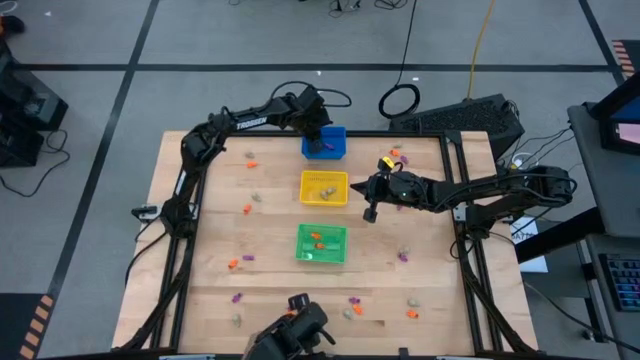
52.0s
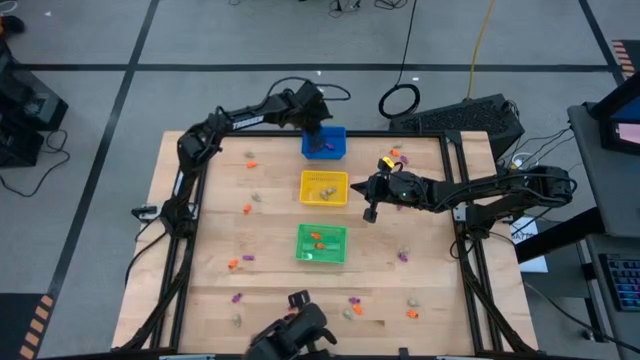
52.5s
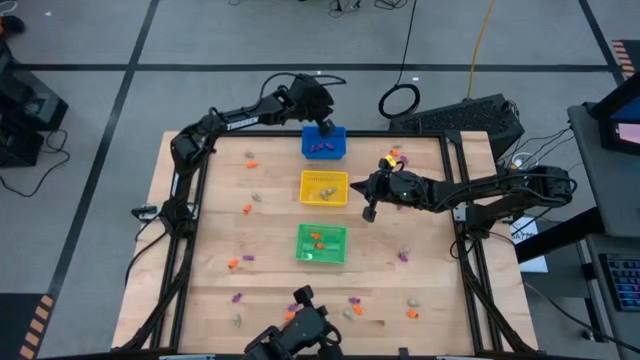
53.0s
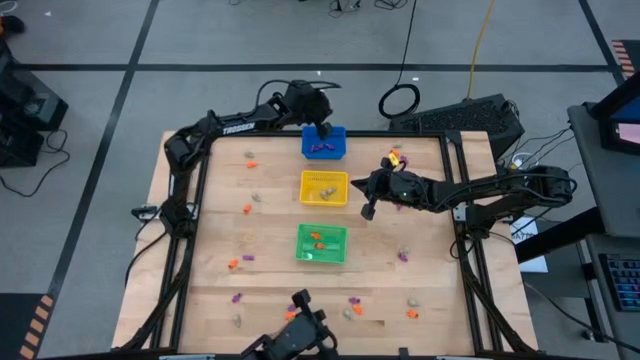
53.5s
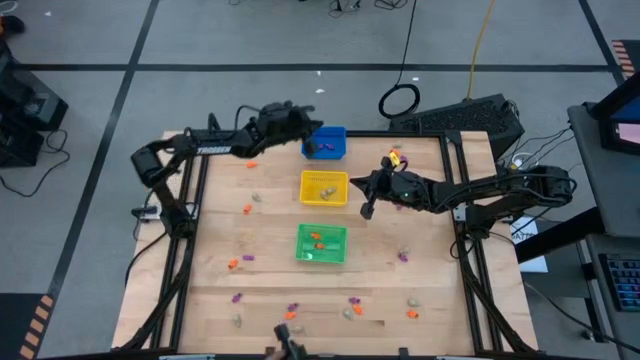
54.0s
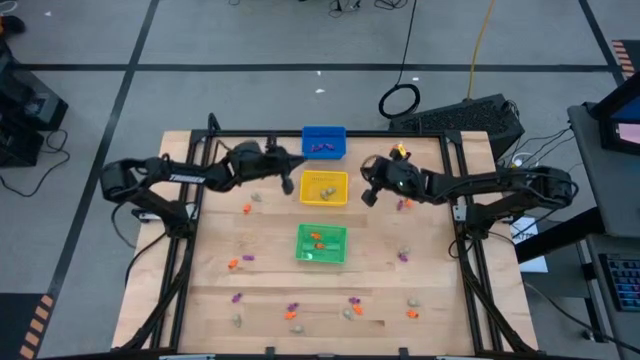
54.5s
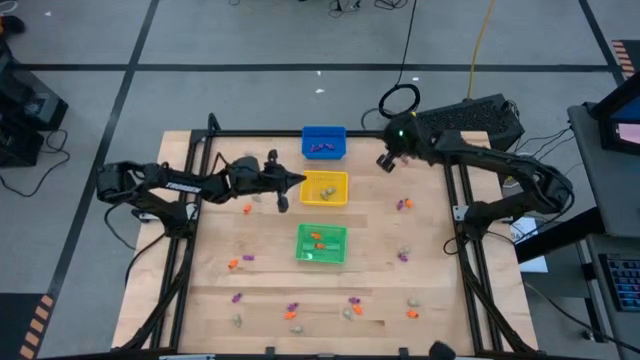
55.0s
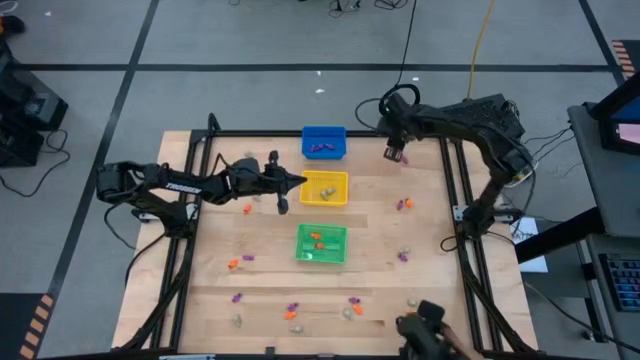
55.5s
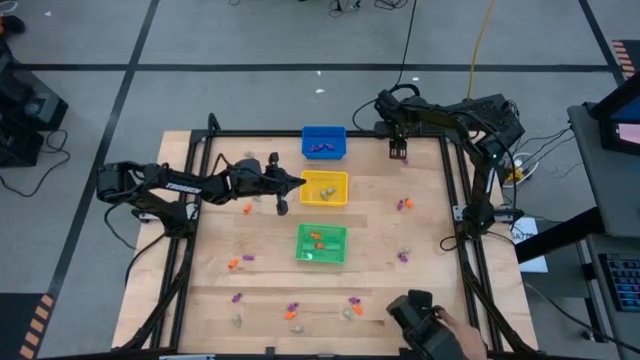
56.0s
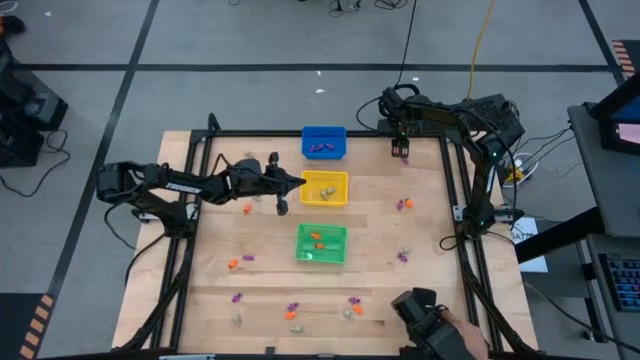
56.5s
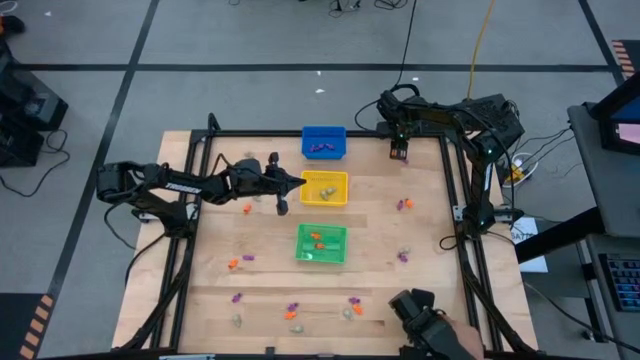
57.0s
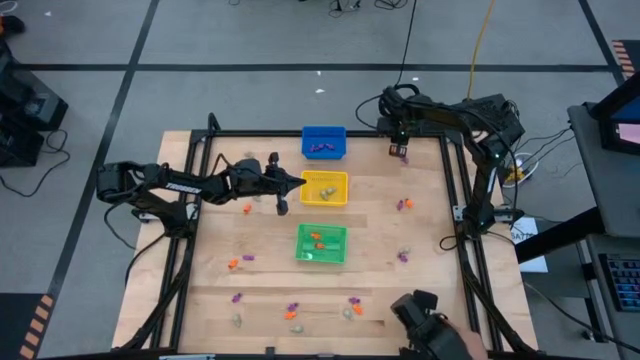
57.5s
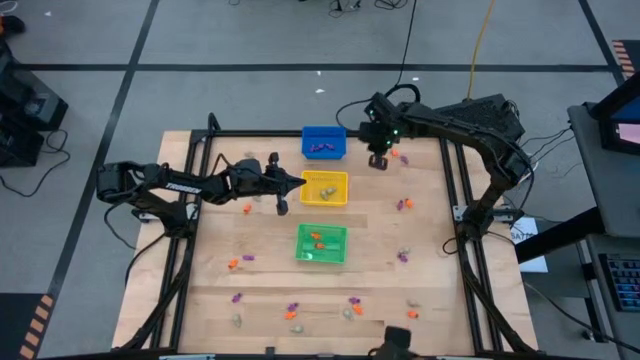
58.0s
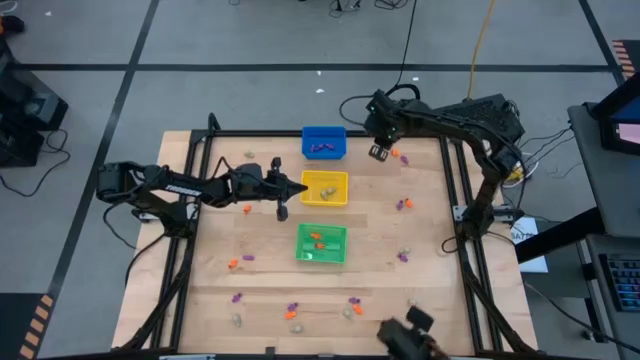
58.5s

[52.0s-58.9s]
Task: Sort Halloween decoration
Put the skull toy into the yellow bin

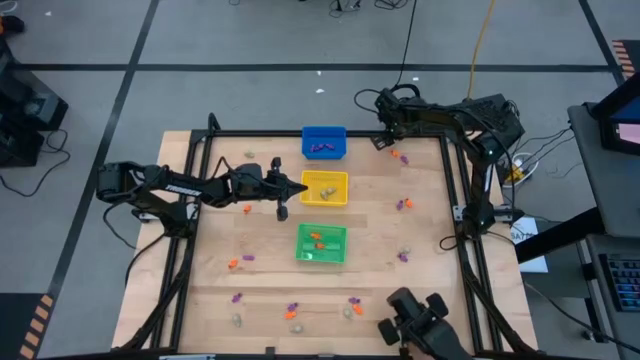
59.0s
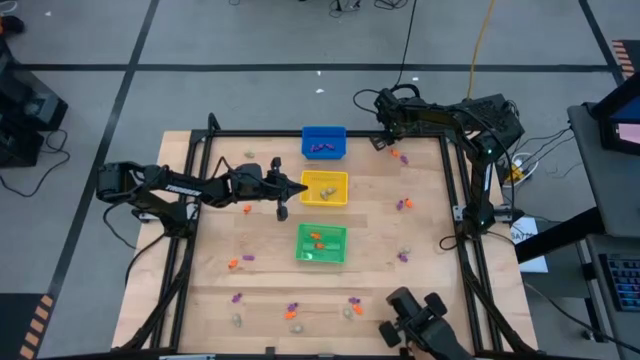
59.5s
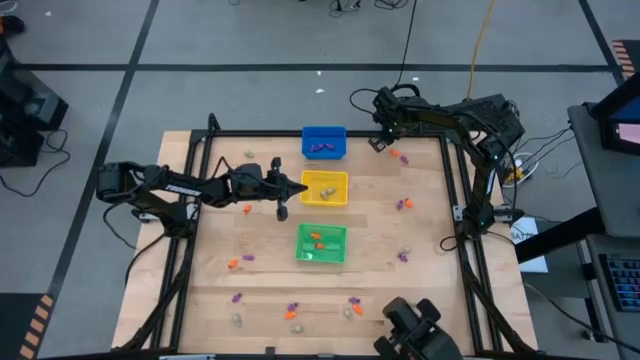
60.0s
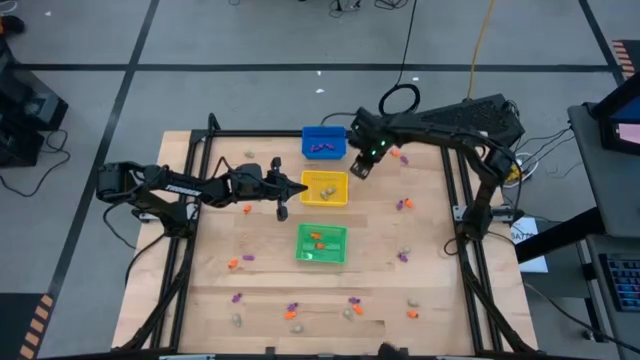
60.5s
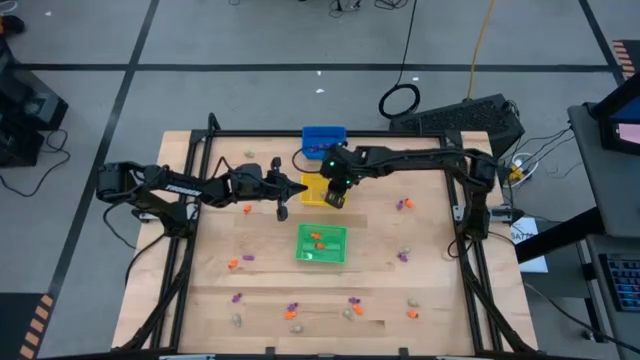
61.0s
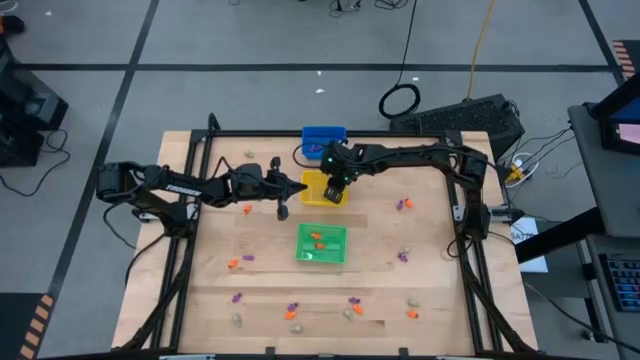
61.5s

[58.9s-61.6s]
Put the skull toy into the yellow bin

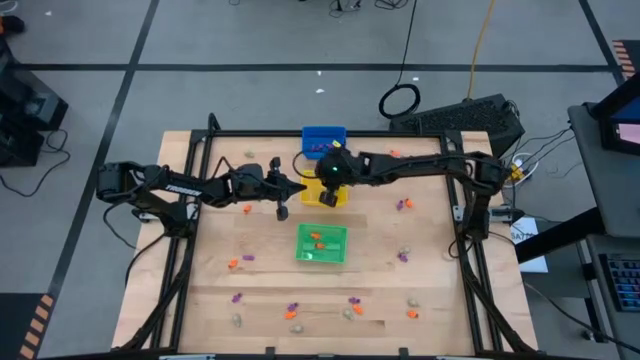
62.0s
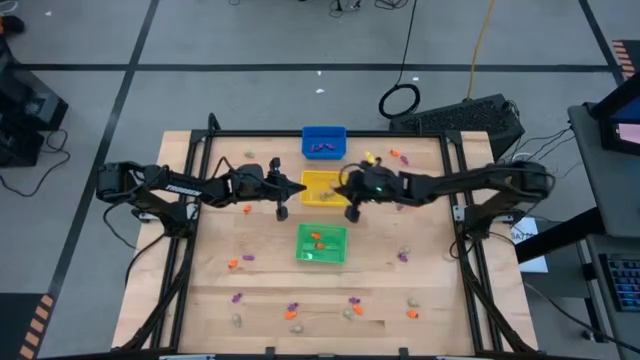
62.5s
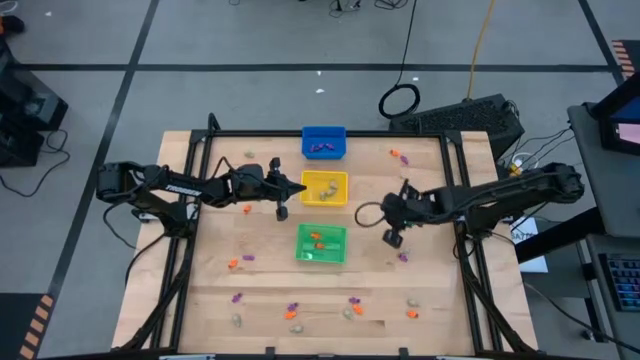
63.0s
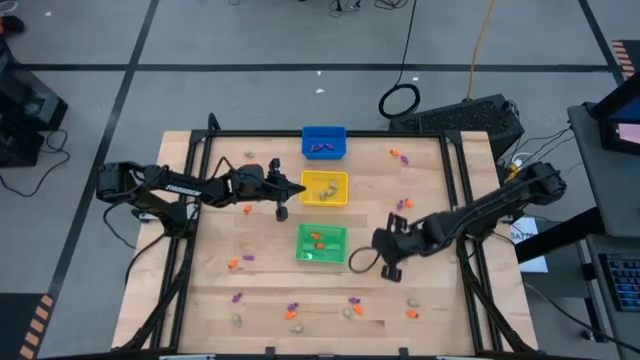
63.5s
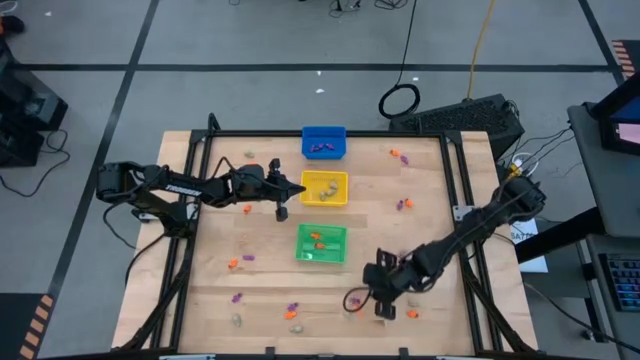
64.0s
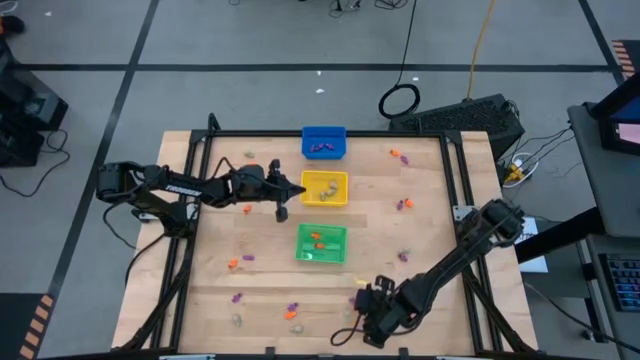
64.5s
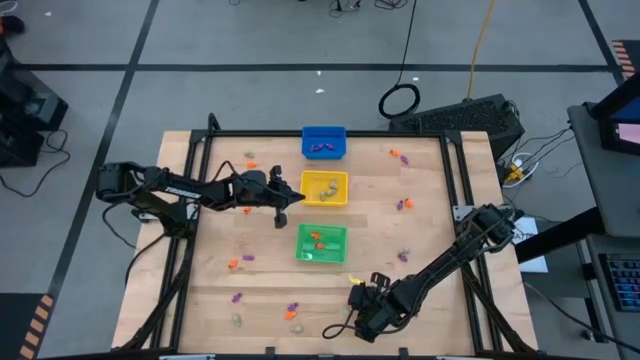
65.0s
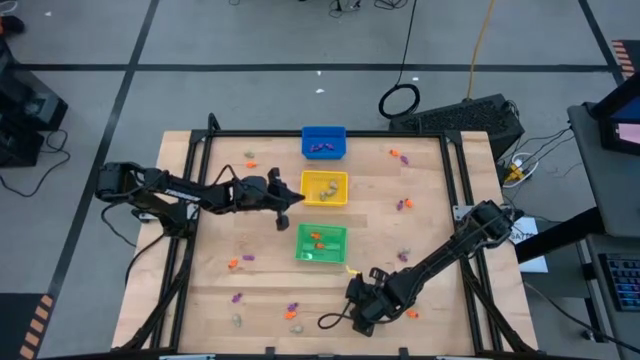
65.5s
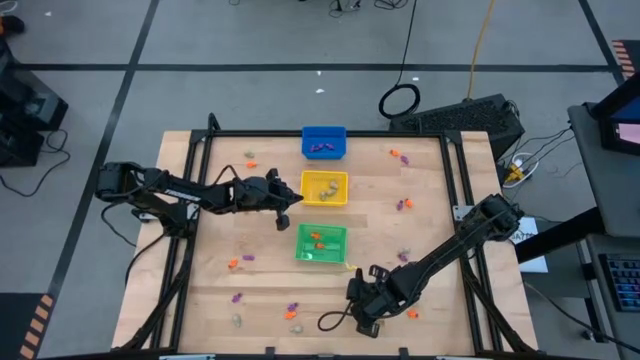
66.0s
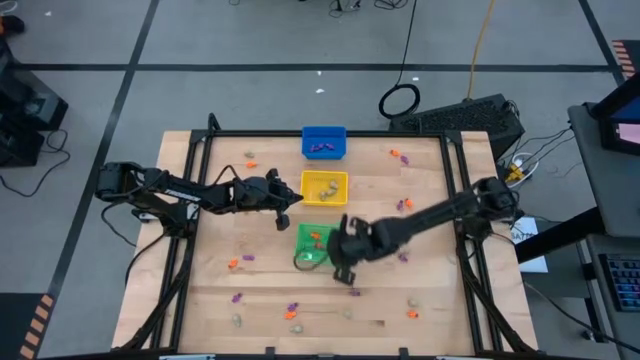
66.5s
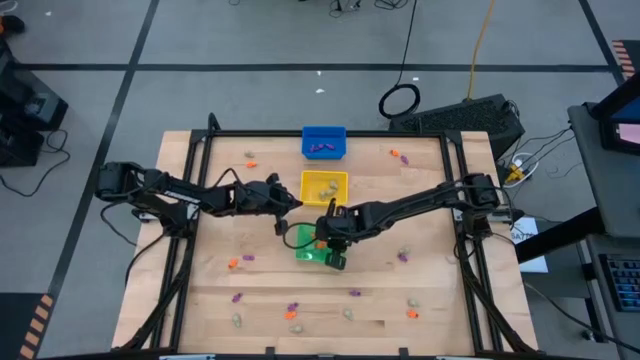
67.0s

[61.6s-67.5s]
Put the orange skeleton toy into the green bin

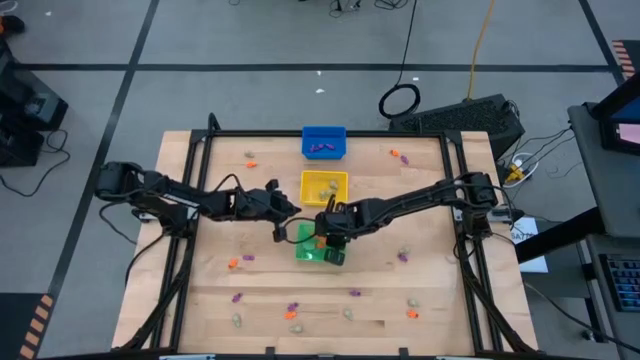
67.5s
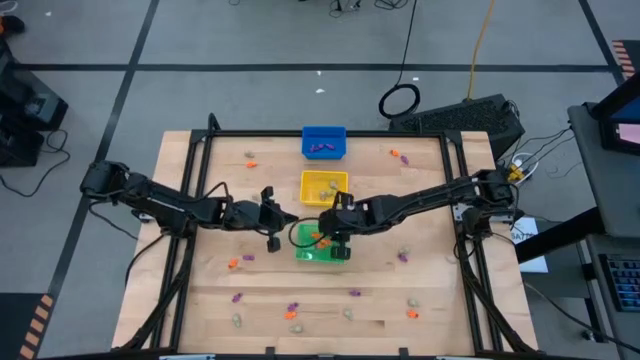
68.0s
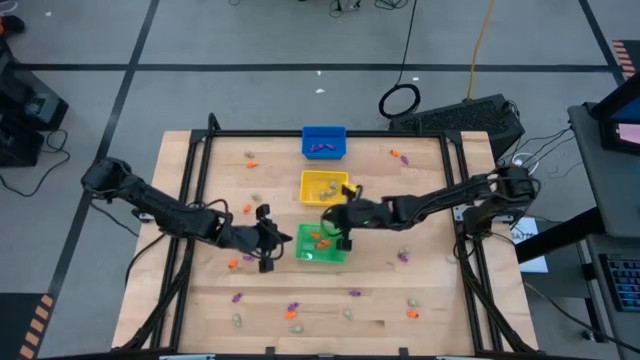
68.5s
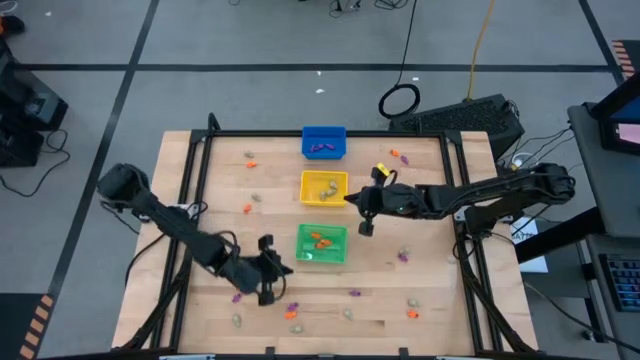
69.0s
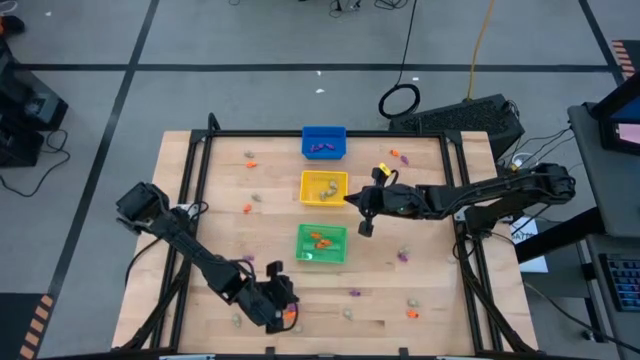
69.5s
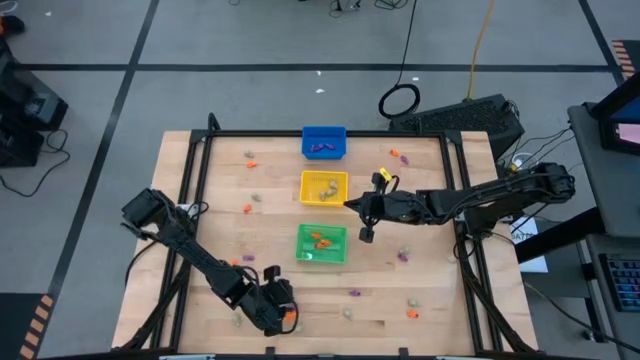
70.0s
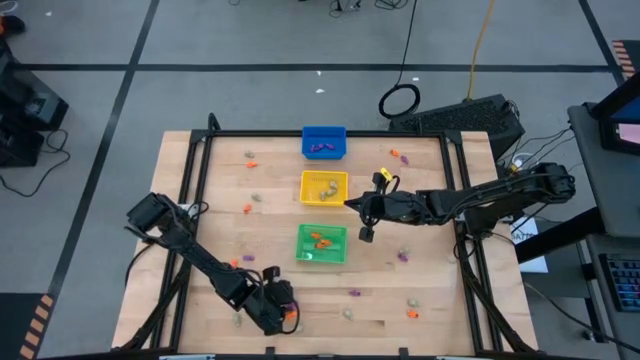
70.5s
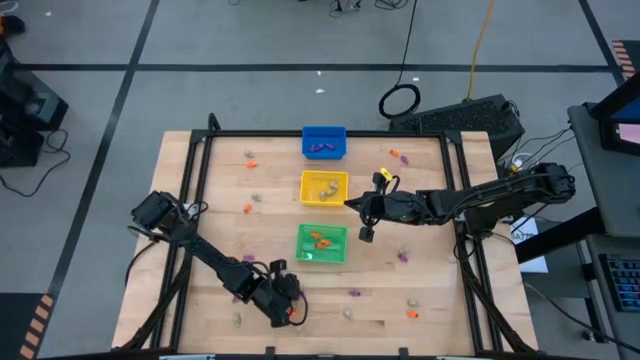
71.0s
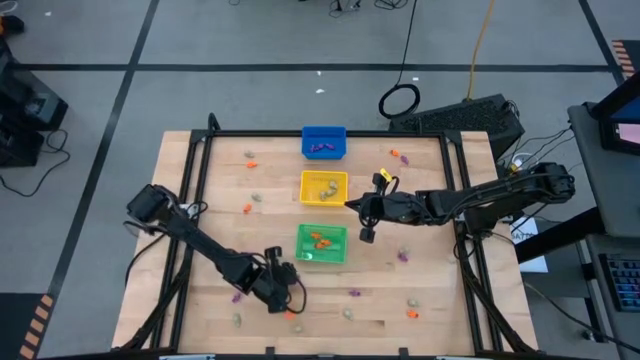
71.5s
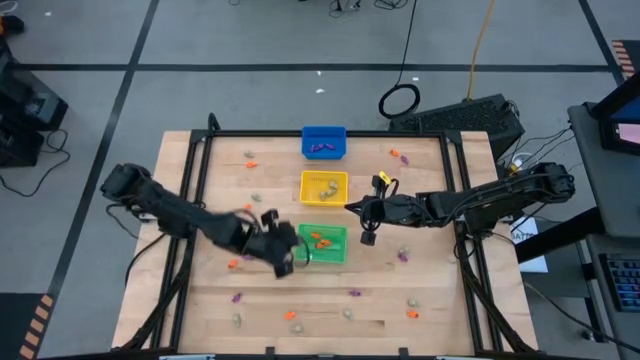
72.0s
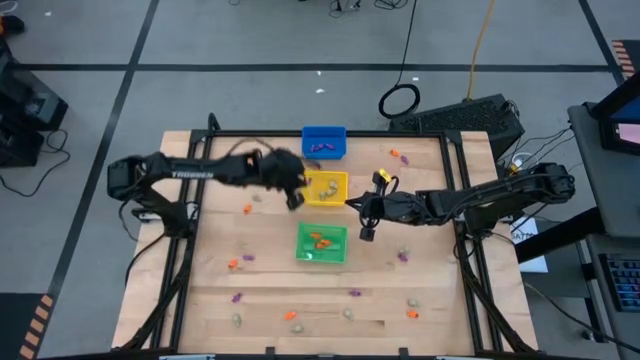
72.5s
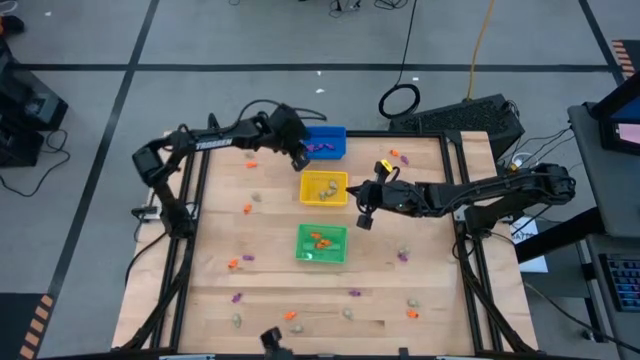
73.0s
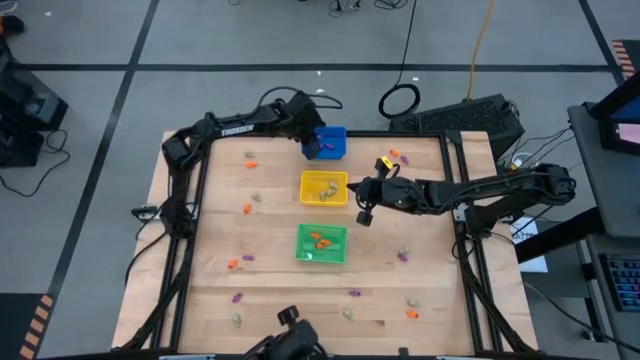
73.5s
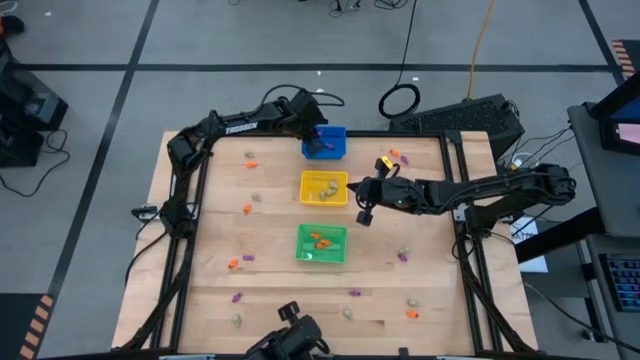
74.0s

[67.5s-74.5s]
Put the purple skeleton toy into the blue bin
